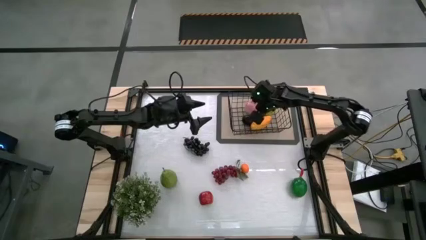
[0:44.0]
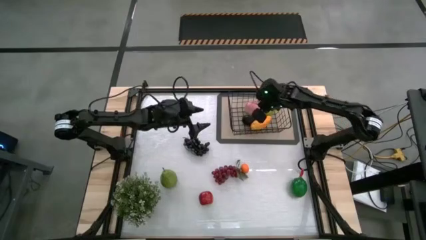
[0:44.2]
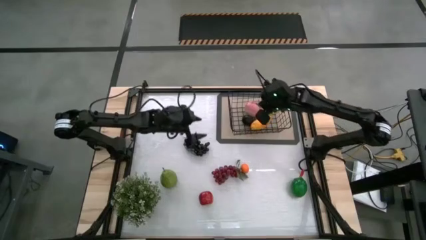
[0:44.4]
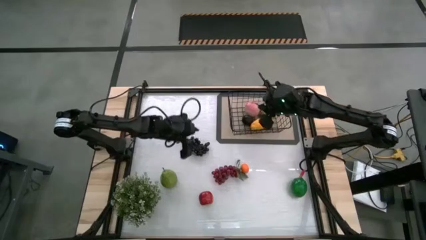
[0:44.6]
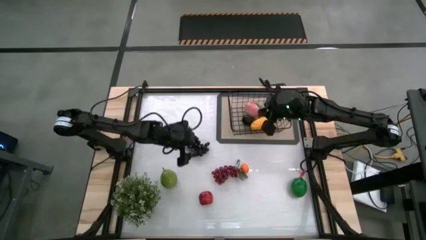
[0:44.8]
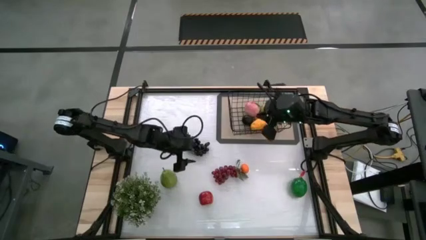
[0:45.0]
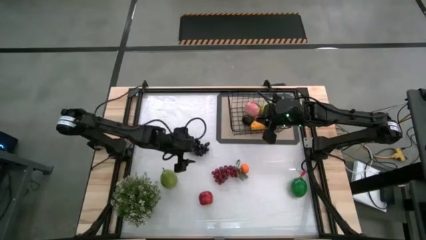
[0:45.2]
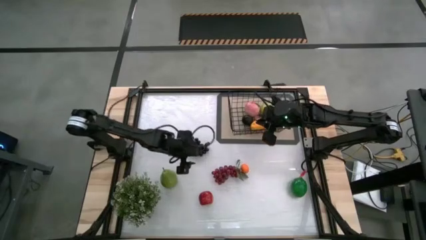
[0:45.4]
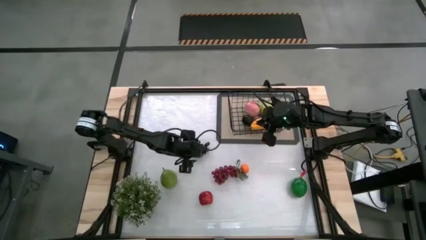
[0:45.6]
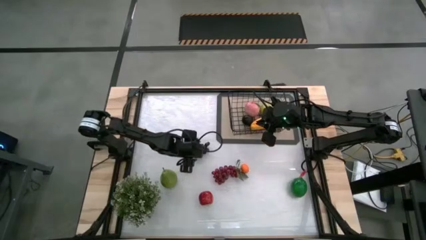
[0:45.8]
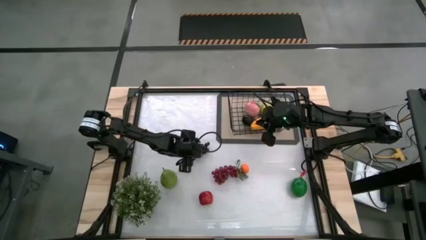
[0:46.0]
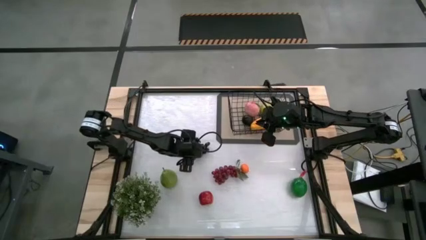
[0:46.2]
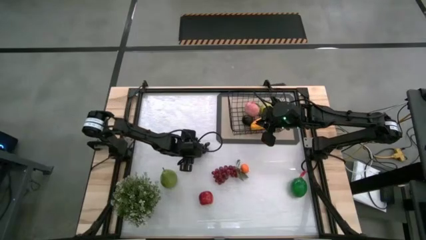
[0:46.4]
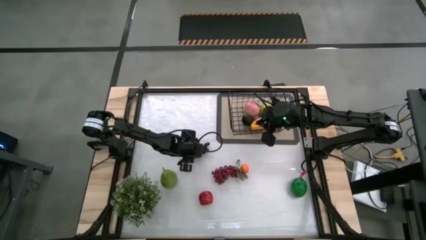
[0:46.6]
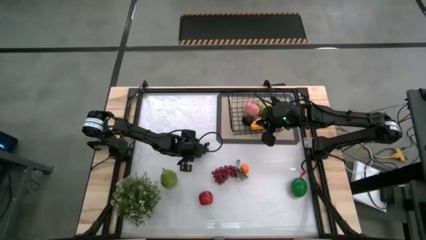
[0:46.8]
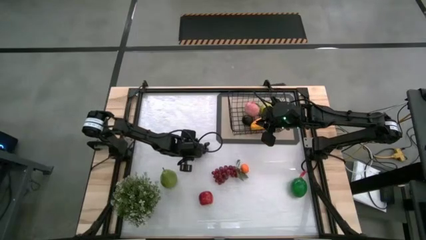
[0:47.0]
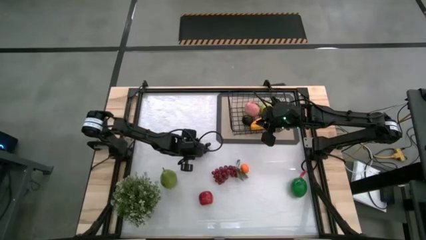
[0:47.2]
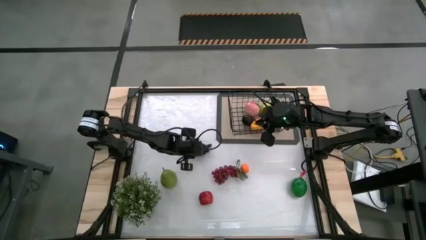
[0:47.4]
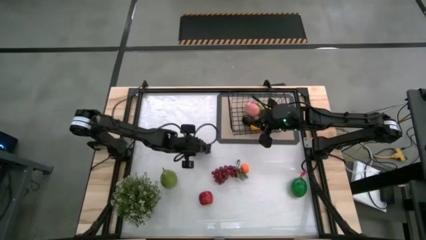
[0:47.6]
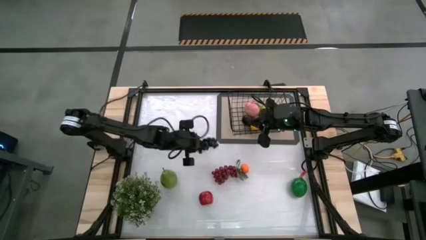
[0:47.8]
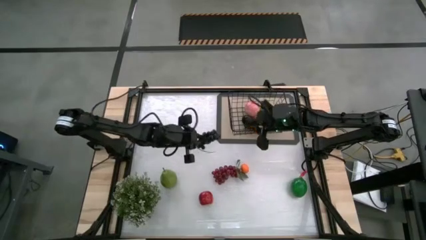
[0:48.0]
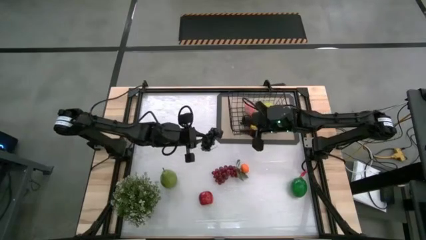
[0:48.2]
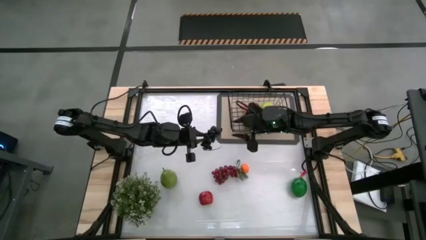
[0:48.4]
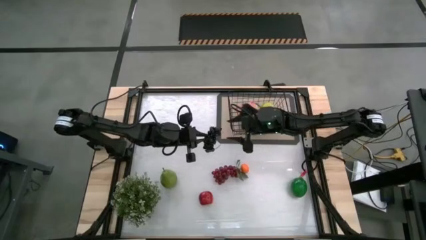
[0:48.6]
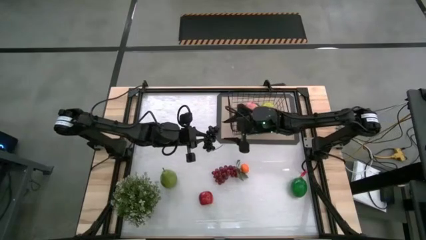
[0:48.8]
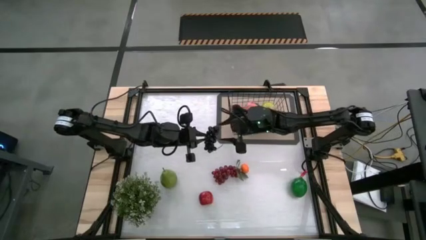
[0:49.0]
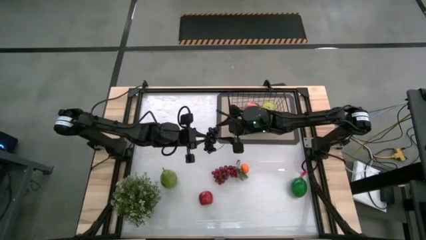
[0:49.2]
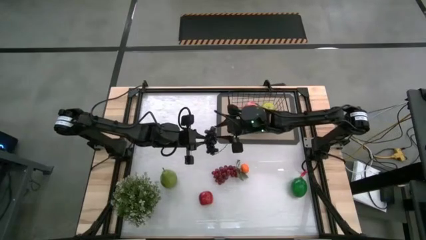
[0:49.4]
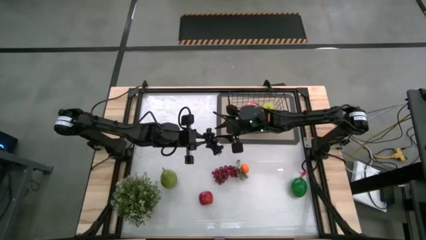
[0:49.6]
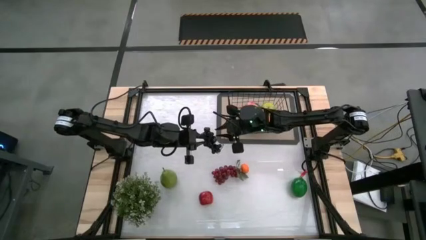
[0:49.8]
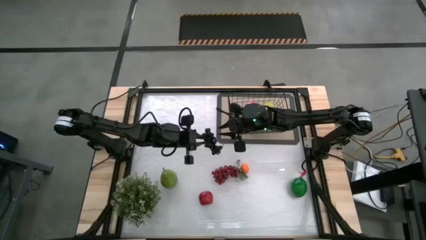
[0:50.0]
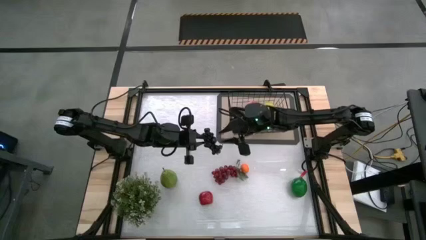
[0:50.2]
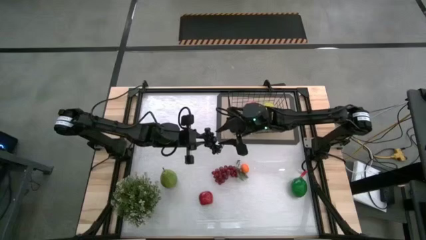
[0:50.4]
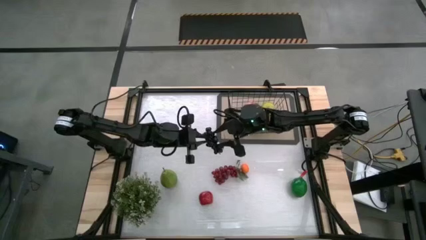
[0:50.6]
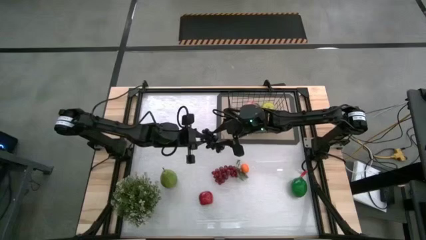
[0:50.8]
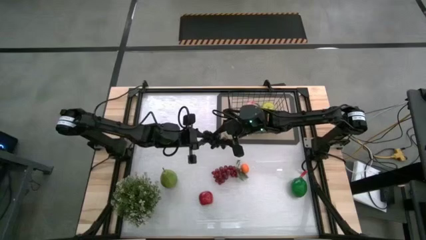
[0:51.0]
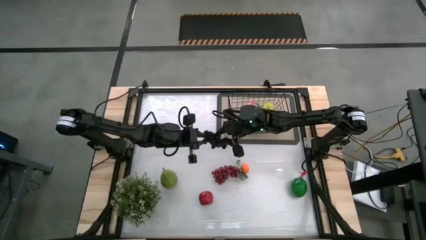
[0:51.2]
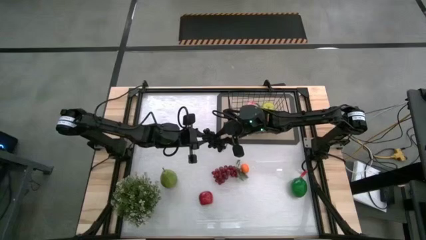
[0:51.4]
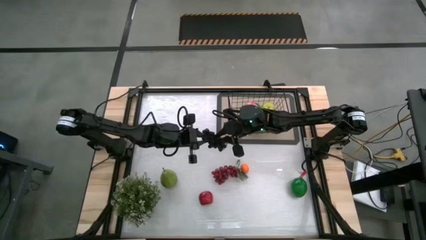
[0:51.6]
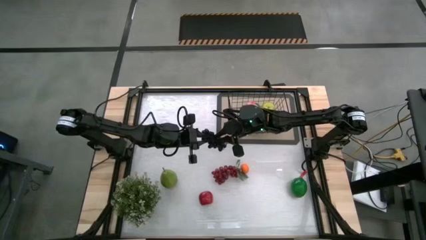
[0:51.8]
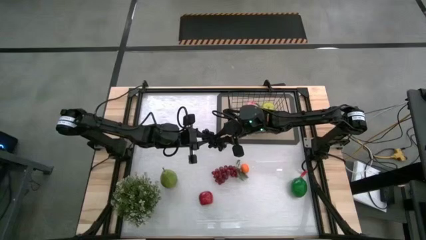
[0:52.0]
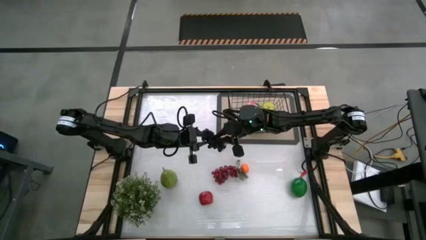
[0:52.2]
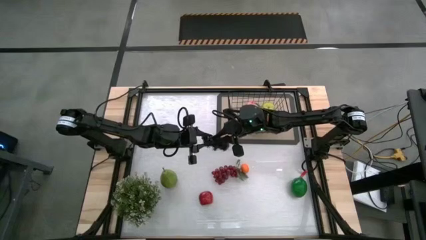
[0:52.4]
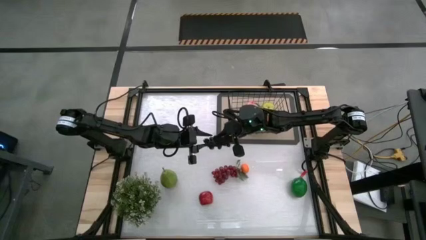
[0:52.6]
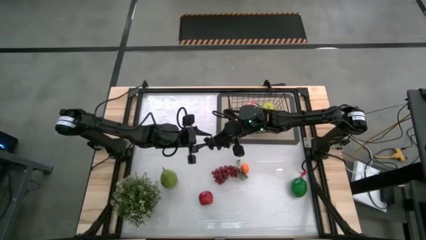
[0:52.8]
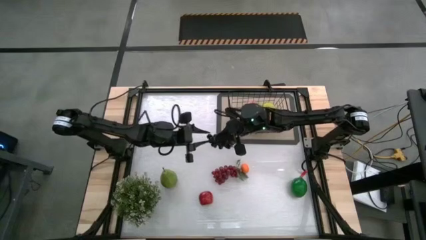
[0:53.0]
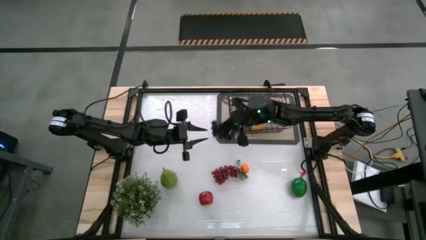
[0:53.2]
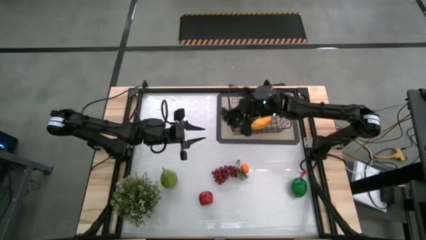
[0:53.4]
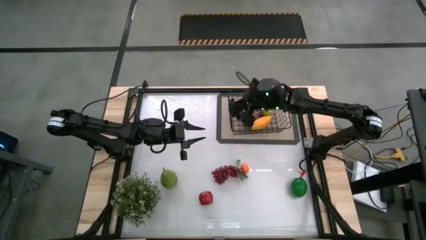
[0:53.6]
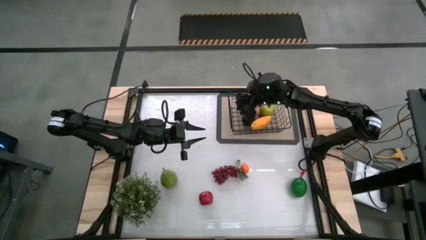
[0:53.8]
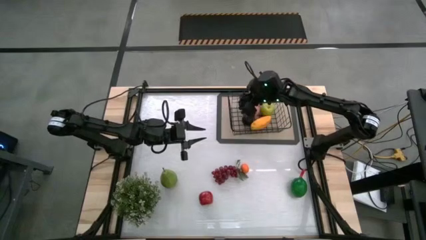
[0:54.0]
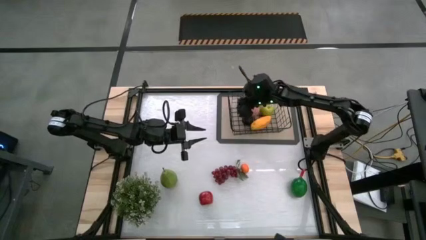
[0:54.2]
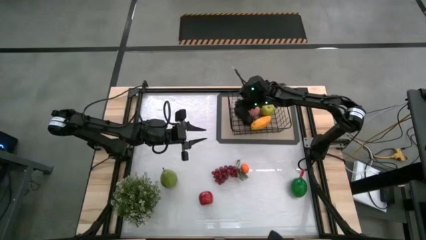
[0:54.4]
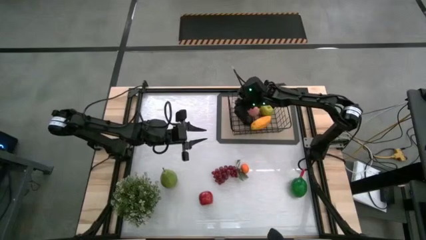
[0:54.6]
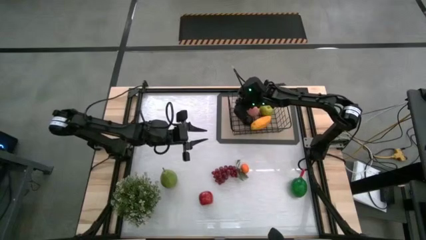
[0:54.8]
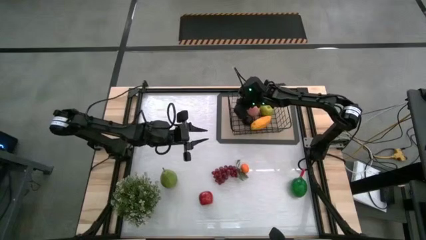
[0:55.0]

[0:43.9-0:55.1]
Task: Build produce basket
Put the violet grapes into the black basket
